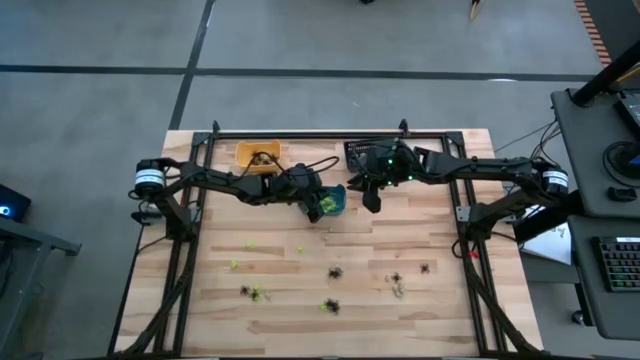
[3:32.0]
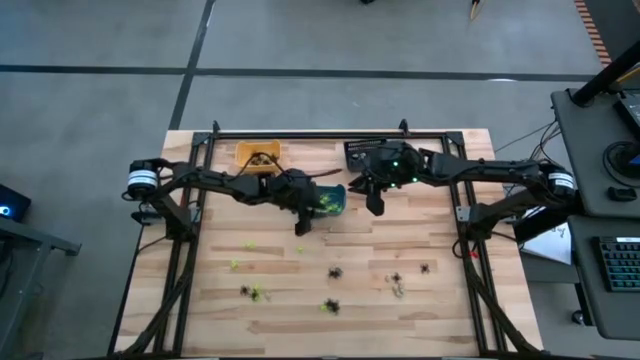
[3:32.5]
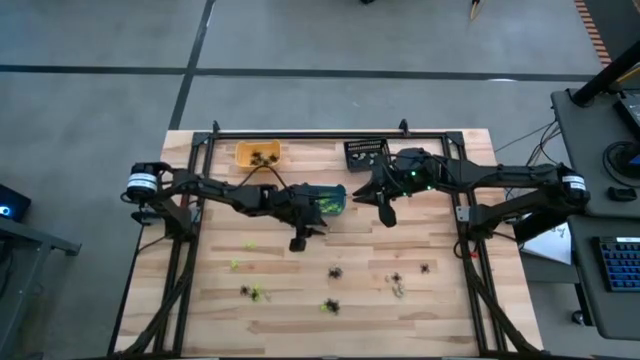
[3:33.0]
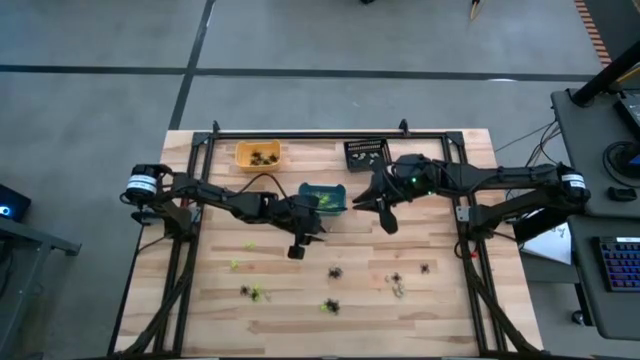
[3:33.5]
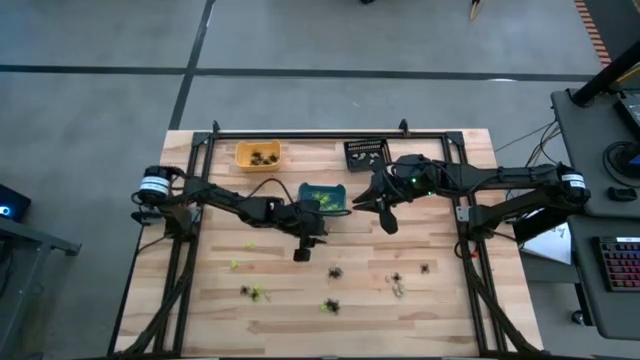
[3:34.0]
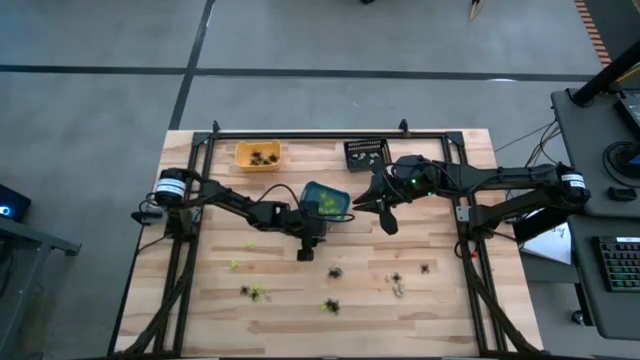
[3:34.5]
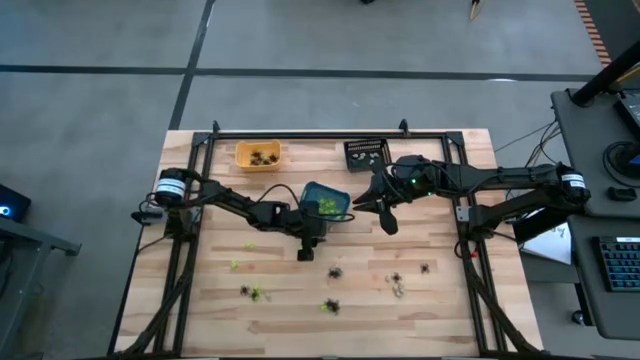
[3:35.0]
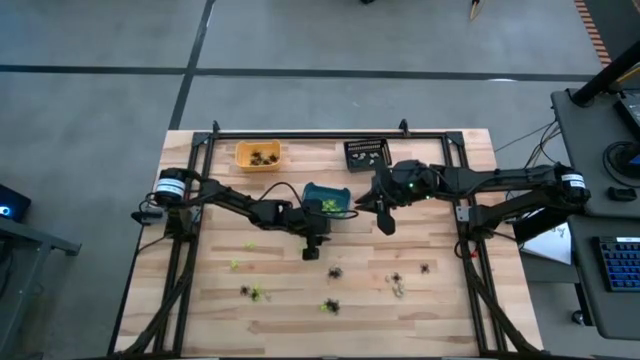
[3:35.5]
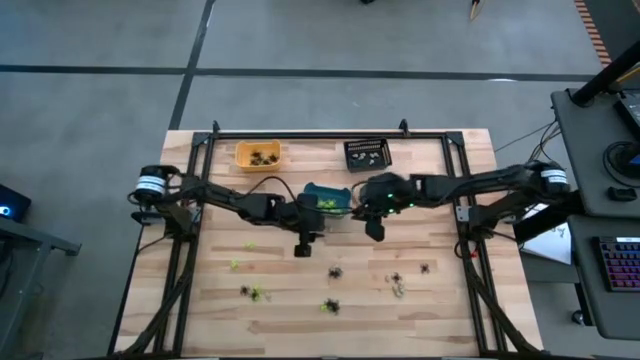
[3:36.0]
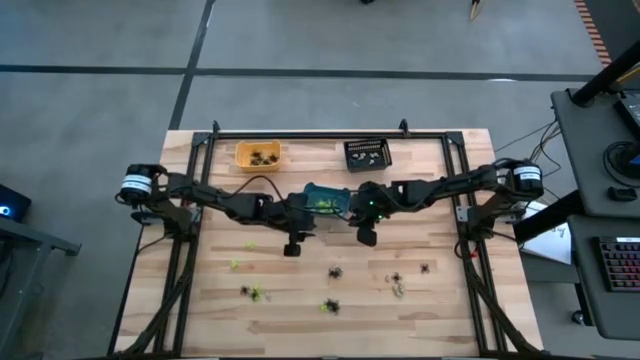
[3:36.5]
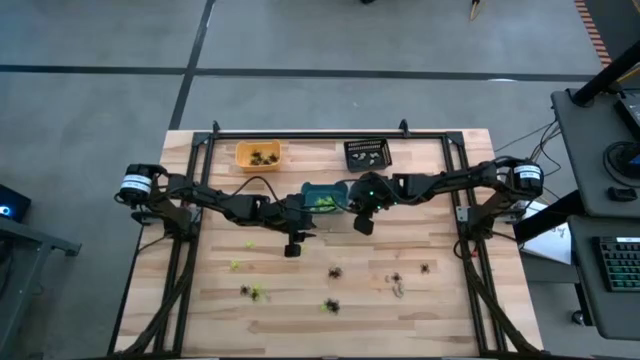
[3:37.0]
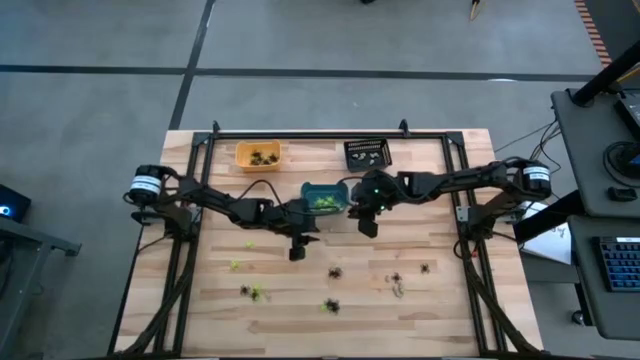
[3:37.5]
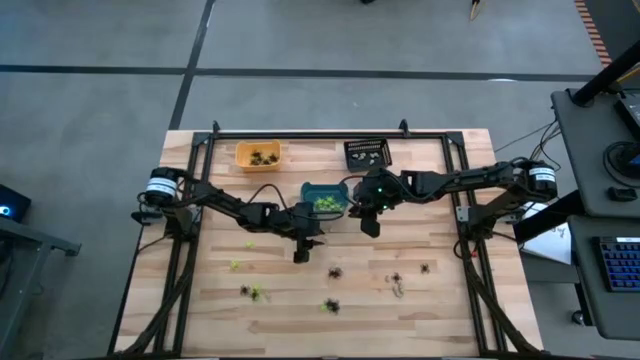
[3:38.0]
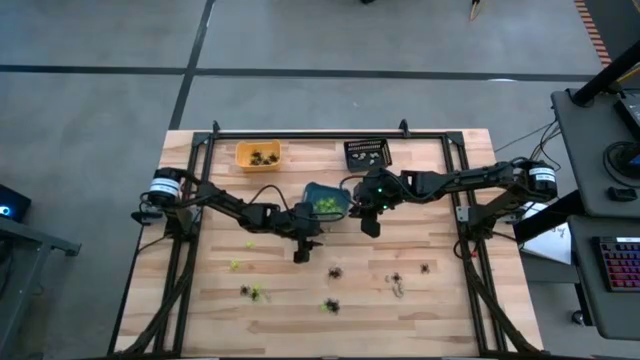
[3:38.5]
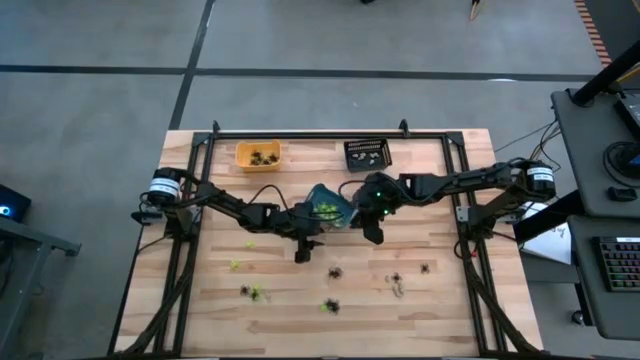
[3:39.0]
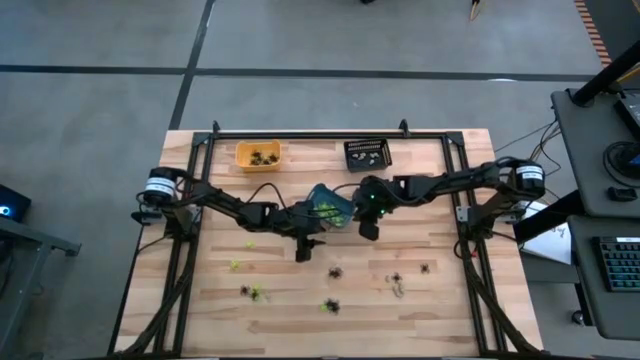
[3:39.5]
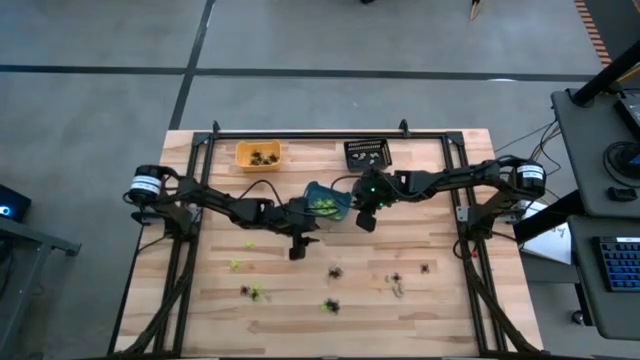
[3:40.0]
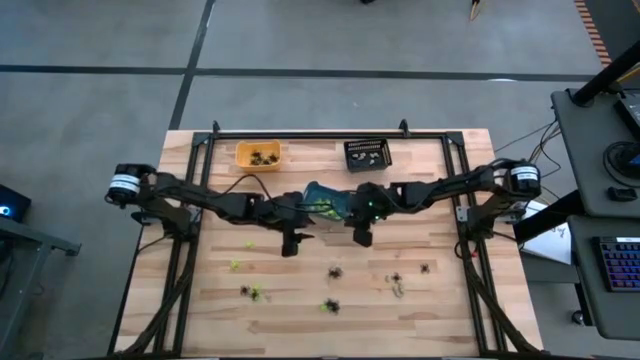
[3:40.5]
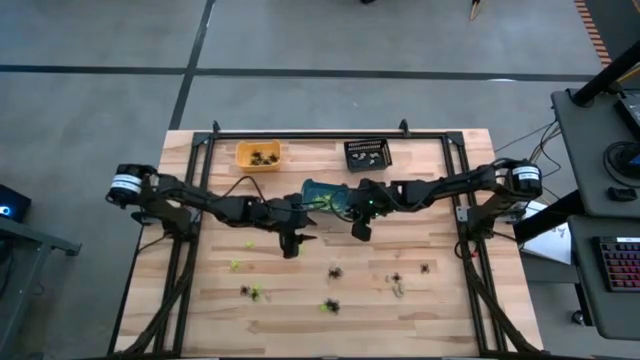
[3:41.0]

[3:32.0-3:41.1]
Task: Sort Halloween decoration
Adjust the blue bin

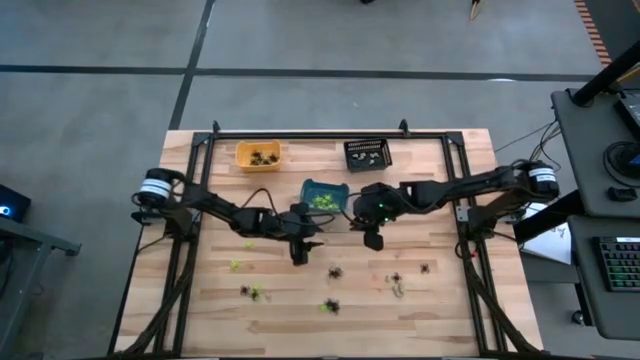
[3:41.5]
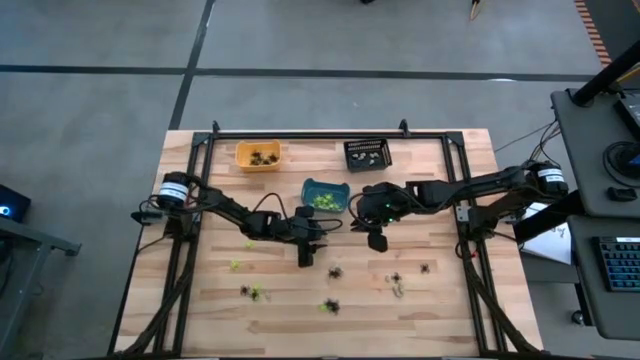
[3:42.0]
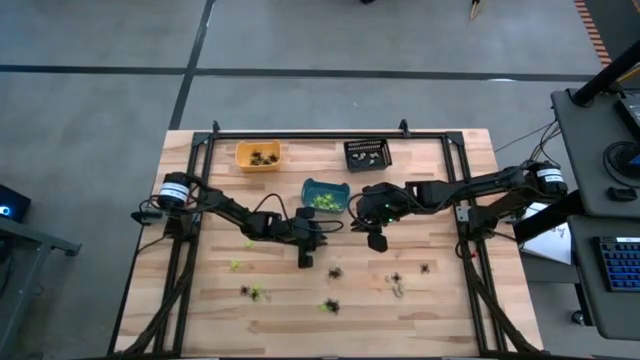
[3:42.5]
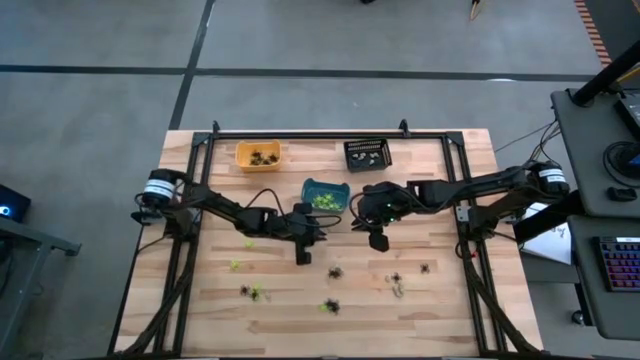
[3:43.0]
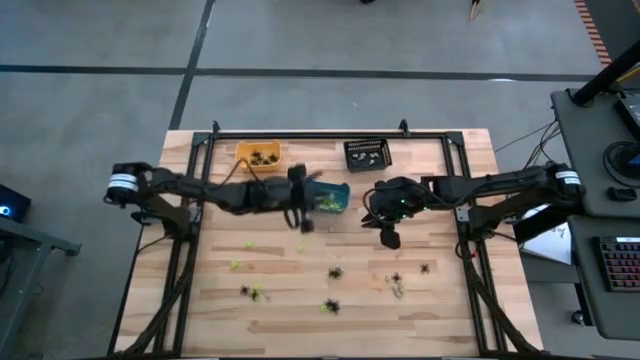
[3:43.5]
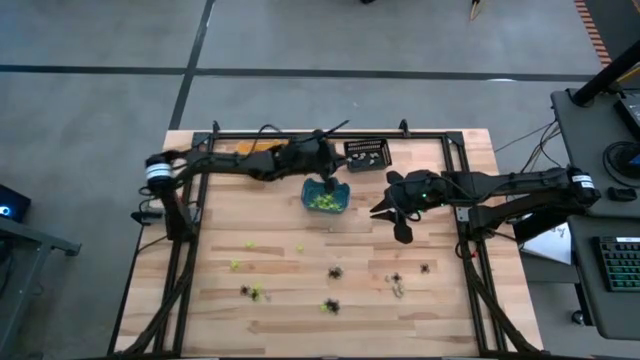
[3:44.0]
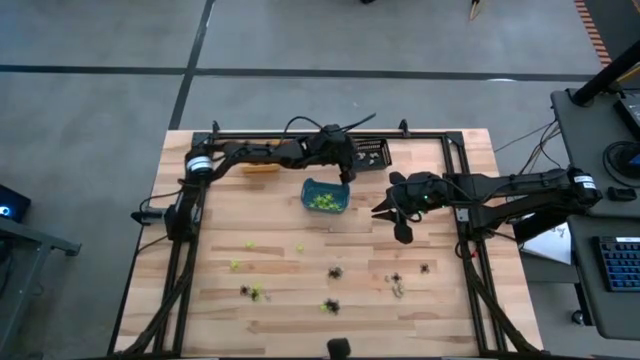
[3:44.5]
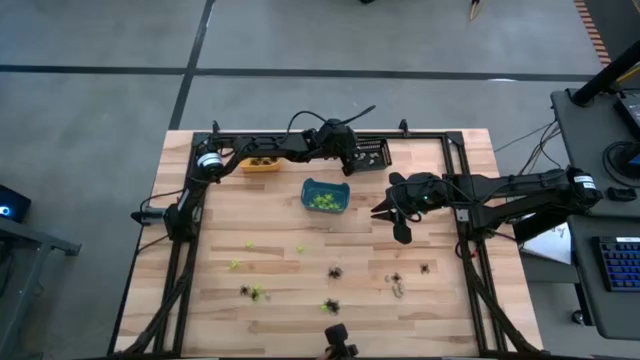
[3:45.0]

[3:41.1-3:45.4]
Put the white skull toy into the black bin

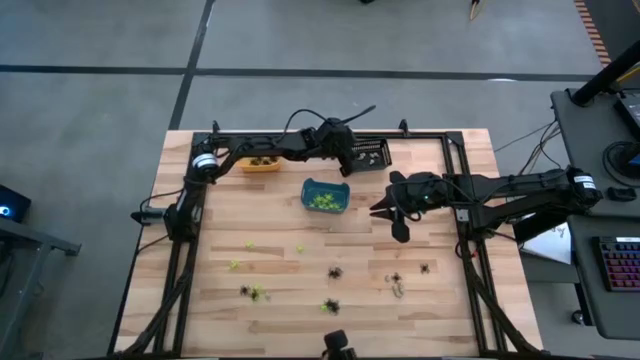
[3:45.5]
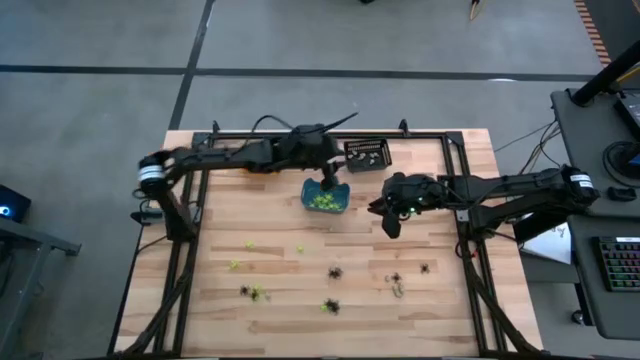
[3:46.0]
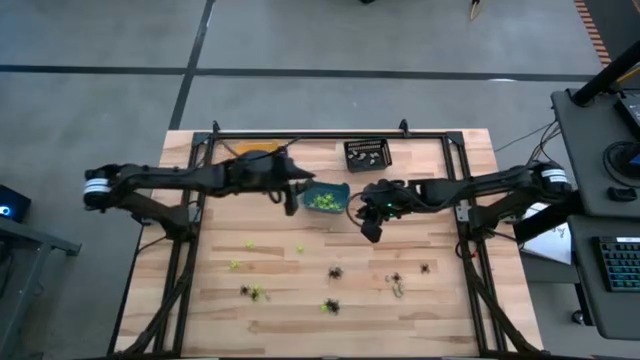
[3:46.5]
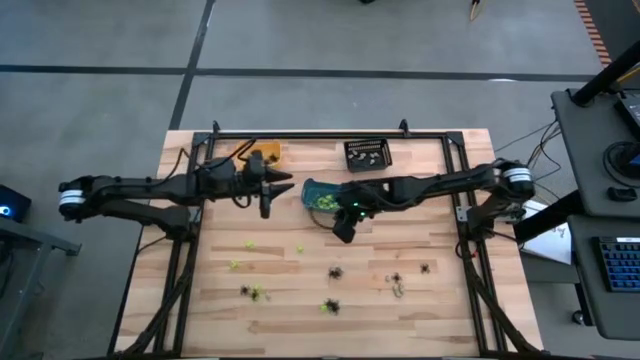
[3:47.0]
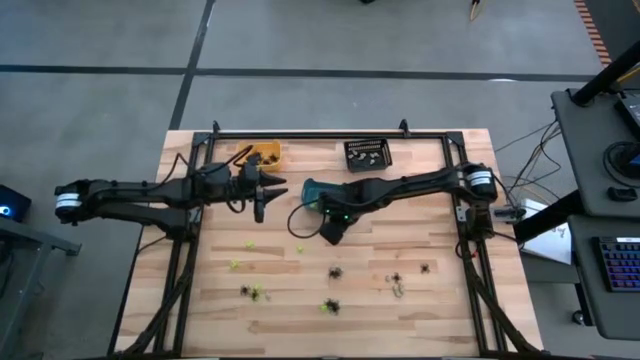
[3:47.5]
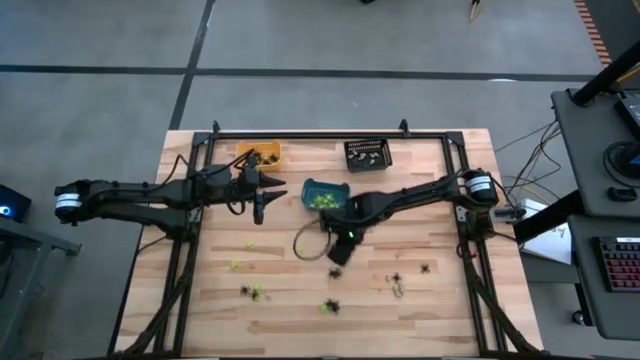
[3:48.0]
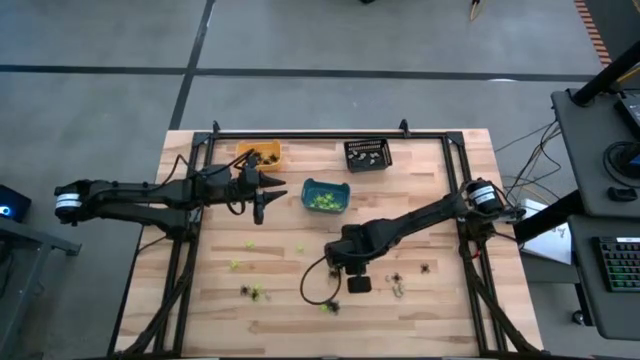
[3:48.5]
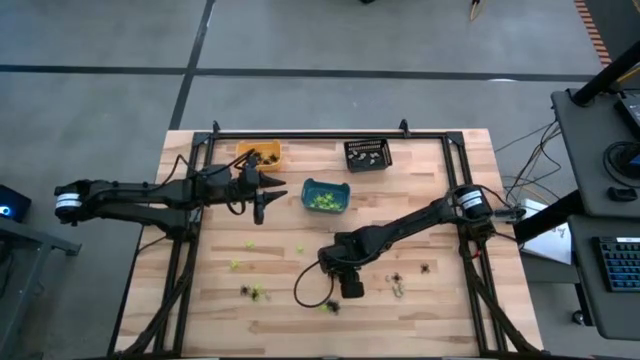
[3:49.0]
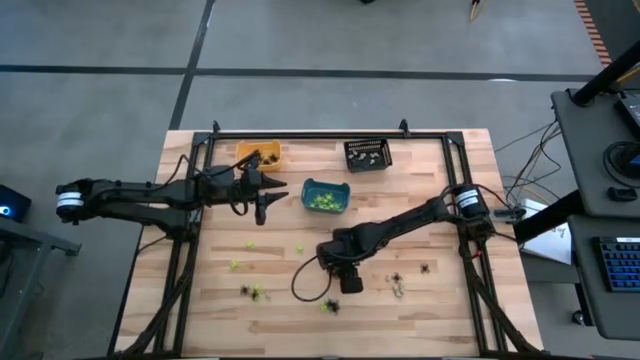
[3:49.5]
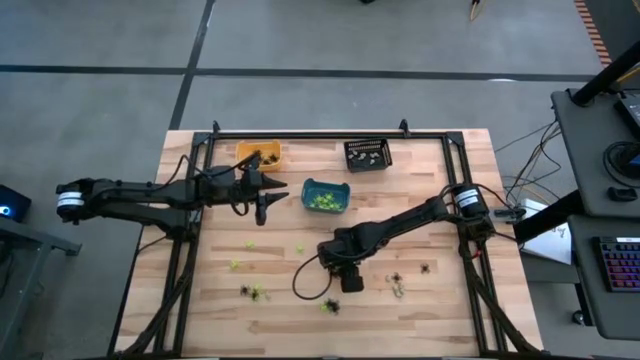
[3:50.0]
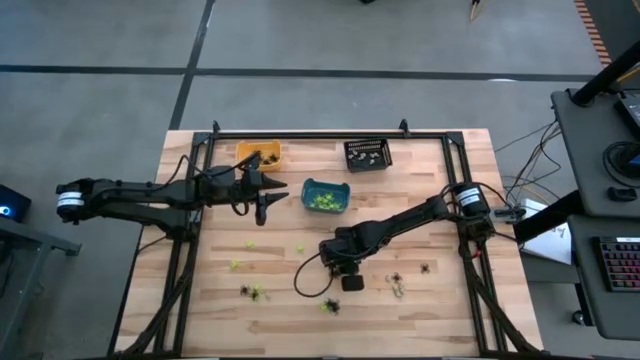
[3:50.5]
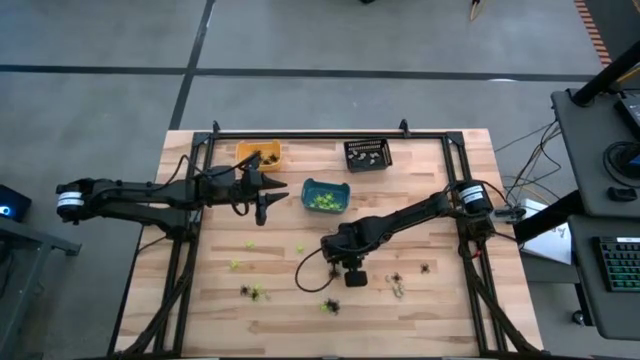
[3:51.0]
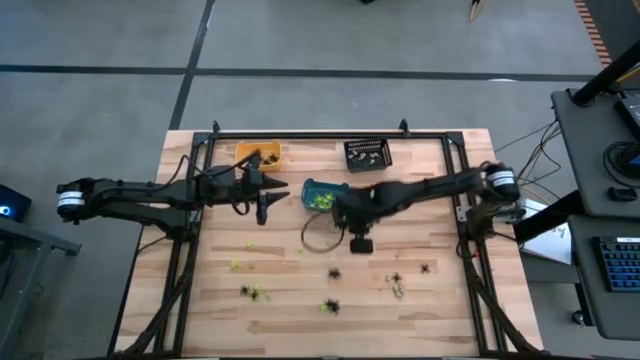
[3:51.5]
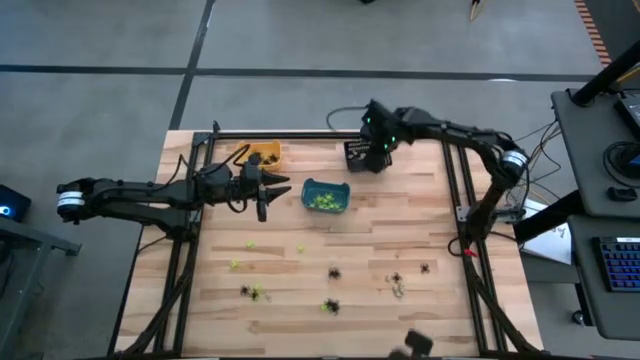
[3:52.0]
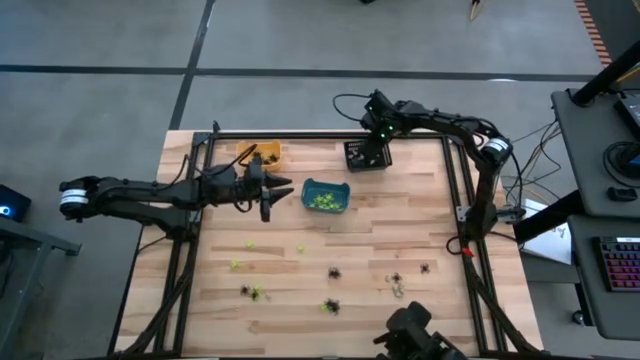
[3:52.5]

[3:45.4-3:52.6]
Put the white skull toy into the black bin
